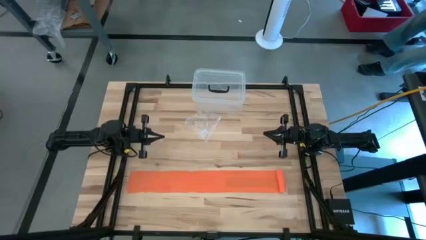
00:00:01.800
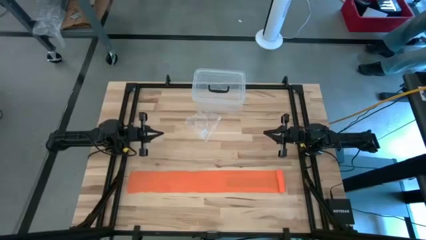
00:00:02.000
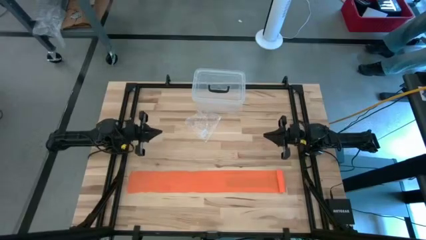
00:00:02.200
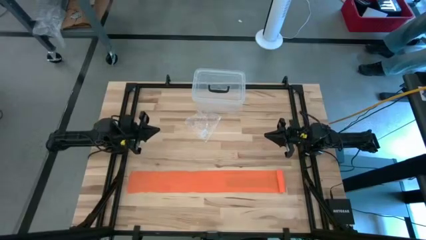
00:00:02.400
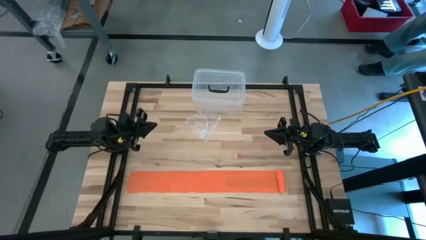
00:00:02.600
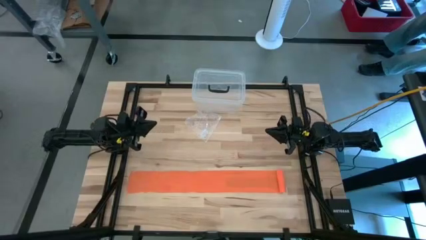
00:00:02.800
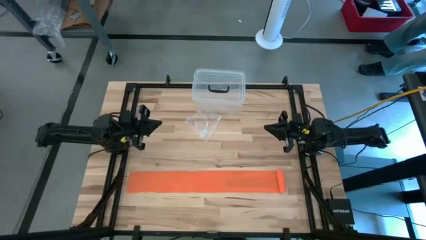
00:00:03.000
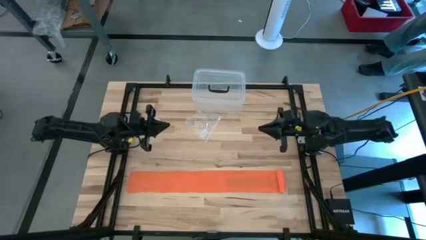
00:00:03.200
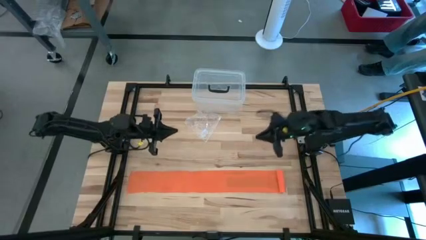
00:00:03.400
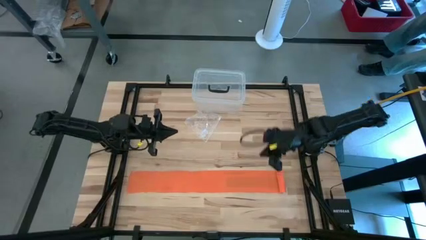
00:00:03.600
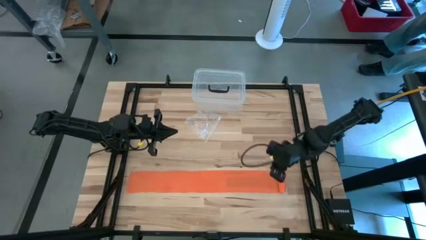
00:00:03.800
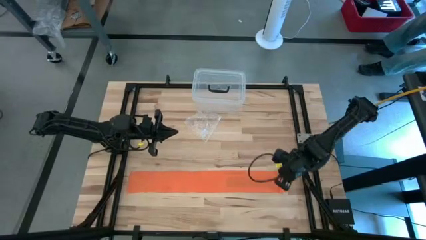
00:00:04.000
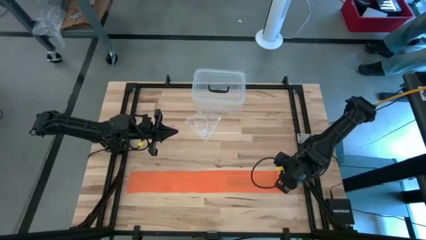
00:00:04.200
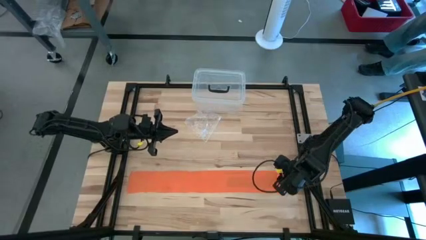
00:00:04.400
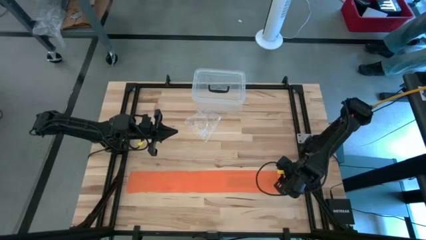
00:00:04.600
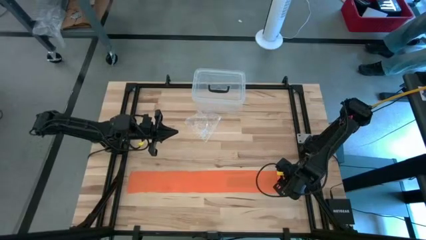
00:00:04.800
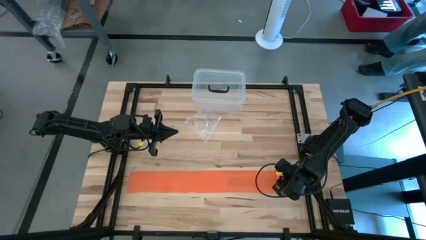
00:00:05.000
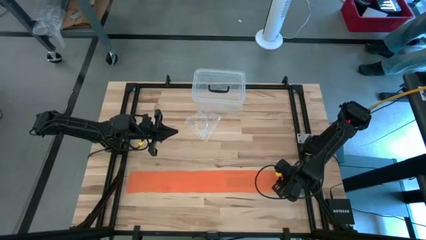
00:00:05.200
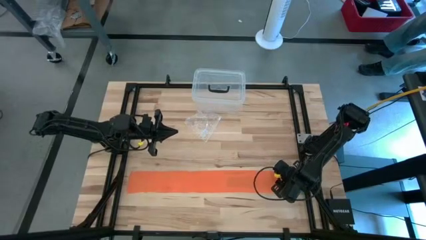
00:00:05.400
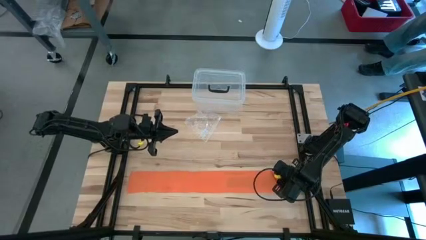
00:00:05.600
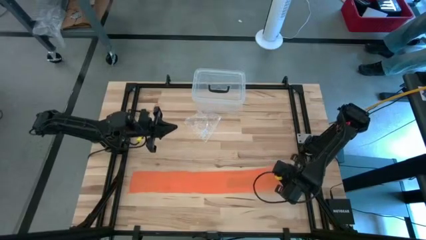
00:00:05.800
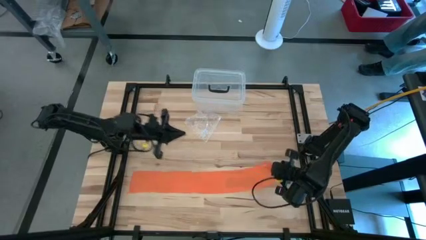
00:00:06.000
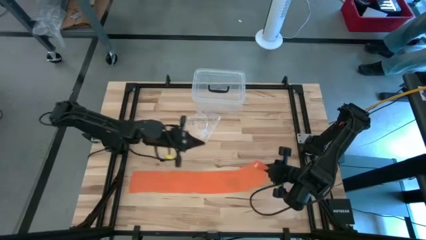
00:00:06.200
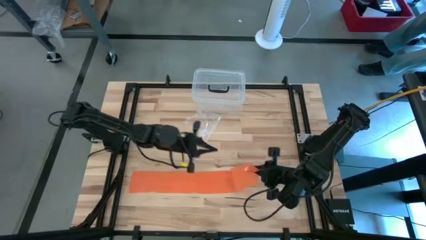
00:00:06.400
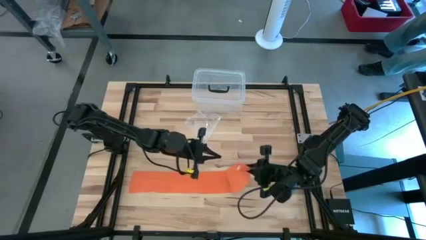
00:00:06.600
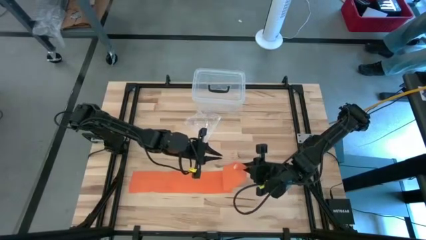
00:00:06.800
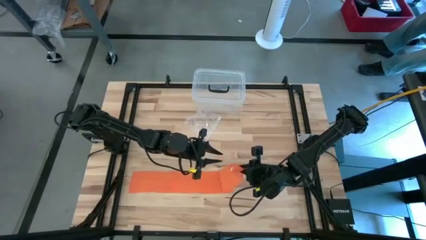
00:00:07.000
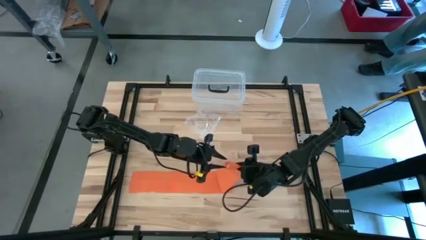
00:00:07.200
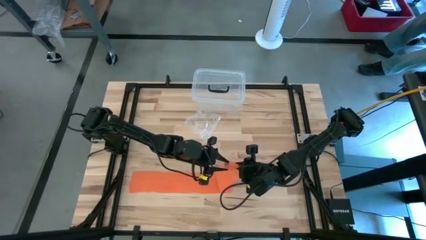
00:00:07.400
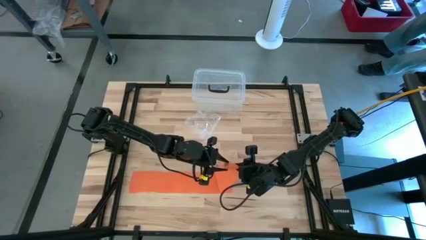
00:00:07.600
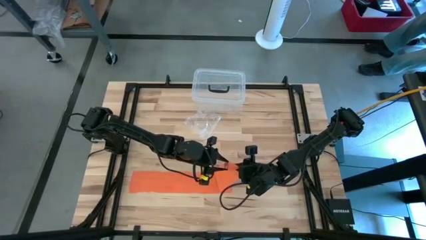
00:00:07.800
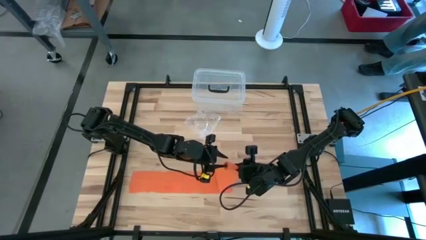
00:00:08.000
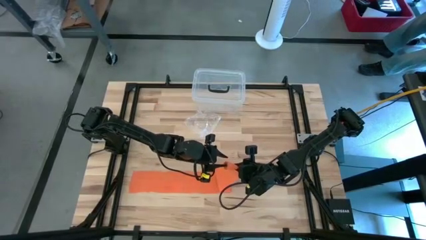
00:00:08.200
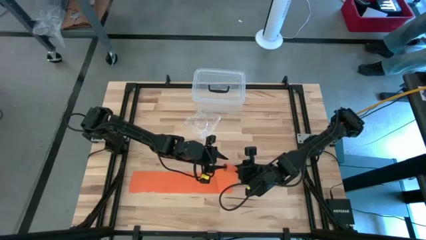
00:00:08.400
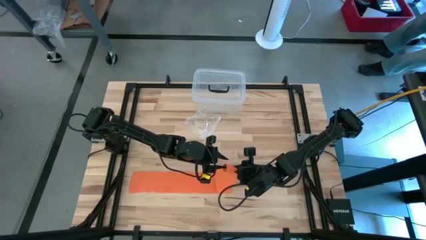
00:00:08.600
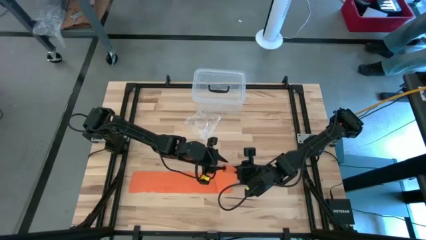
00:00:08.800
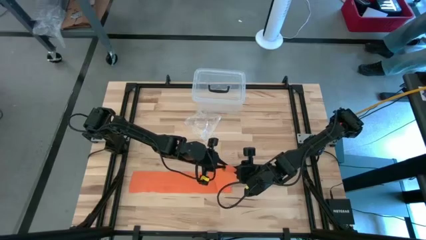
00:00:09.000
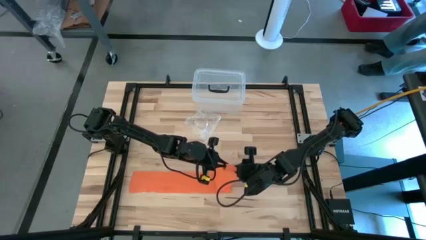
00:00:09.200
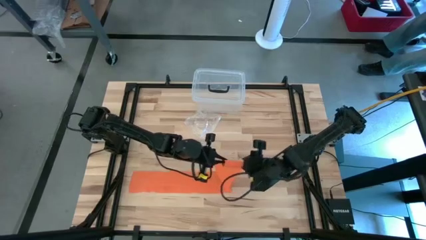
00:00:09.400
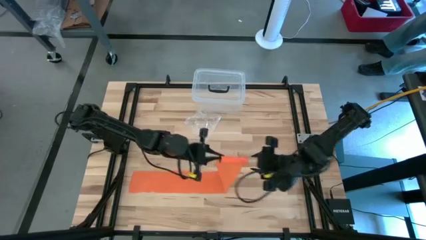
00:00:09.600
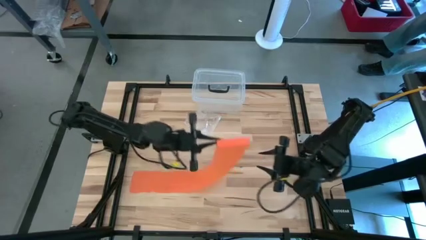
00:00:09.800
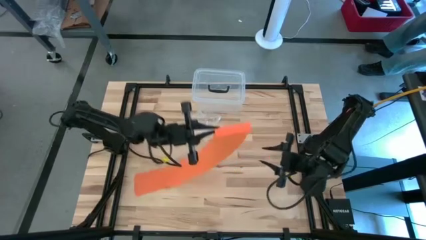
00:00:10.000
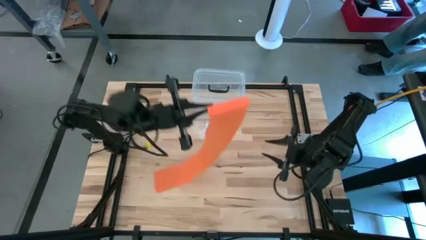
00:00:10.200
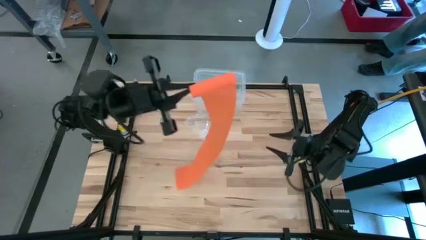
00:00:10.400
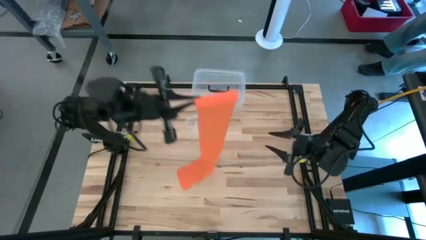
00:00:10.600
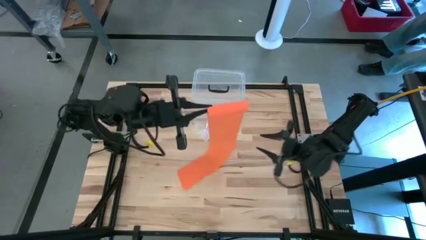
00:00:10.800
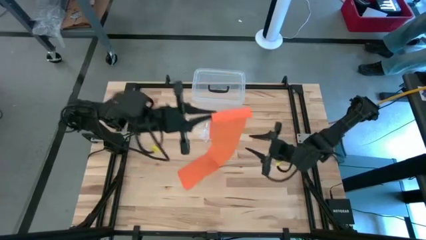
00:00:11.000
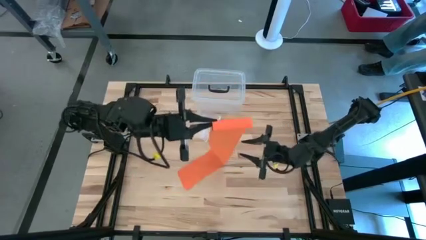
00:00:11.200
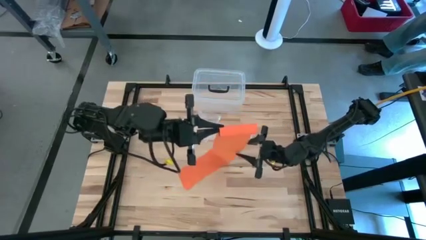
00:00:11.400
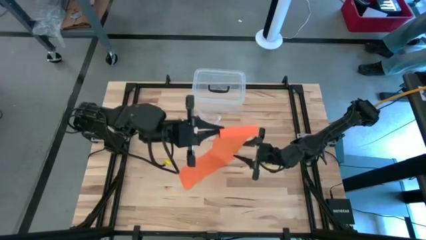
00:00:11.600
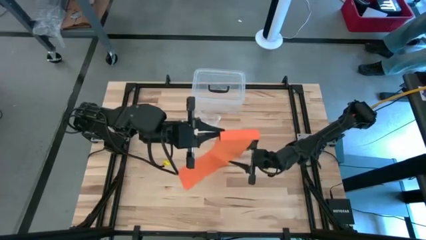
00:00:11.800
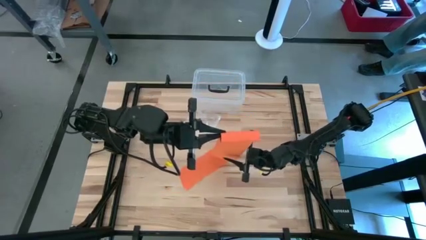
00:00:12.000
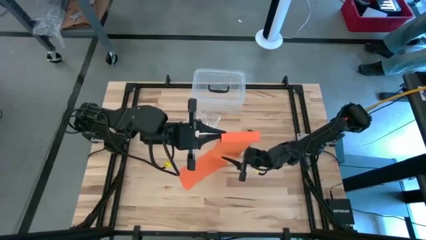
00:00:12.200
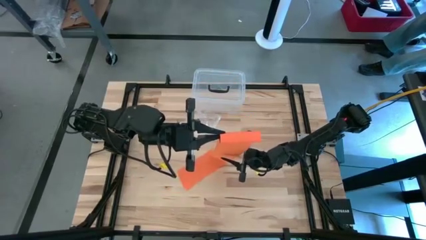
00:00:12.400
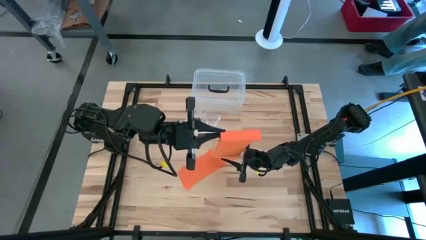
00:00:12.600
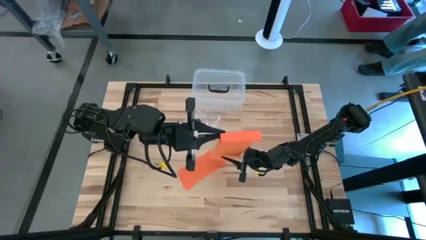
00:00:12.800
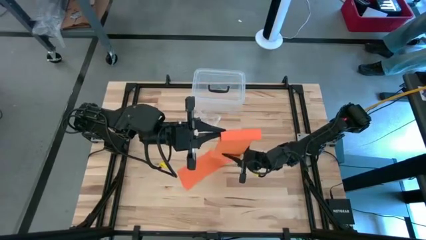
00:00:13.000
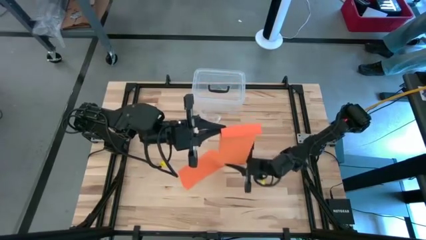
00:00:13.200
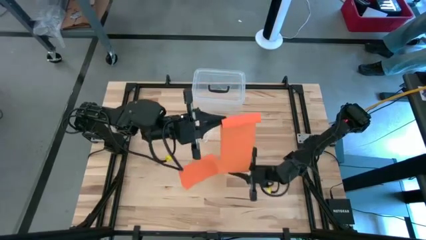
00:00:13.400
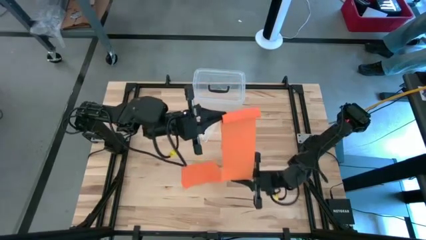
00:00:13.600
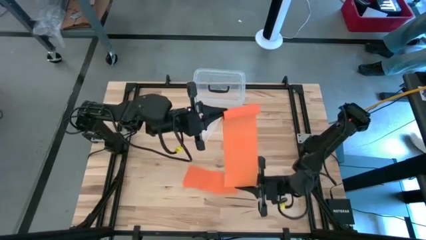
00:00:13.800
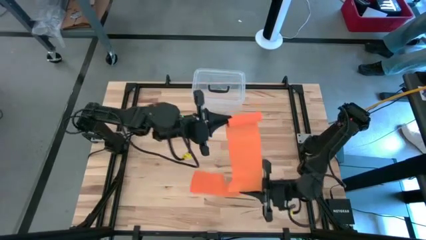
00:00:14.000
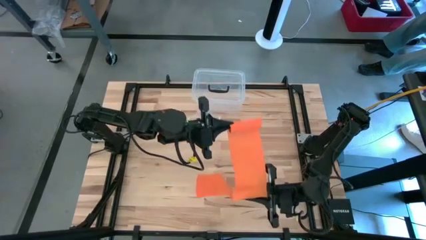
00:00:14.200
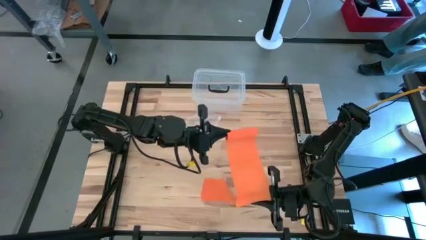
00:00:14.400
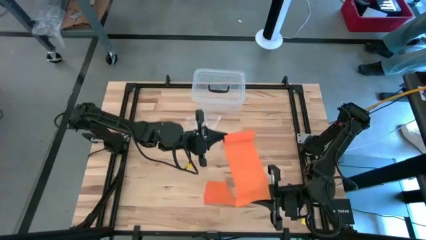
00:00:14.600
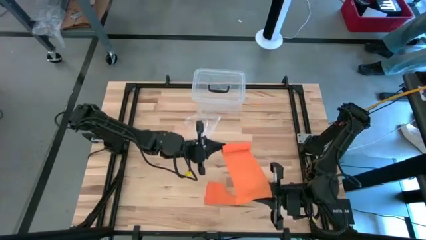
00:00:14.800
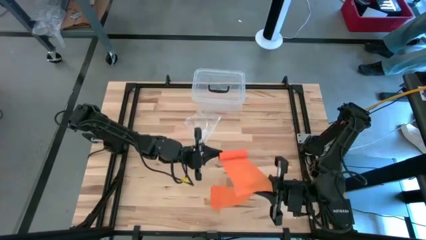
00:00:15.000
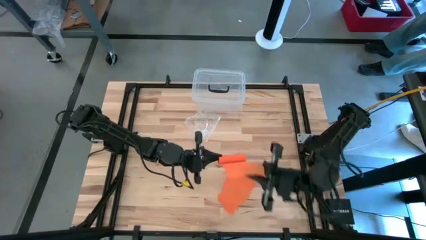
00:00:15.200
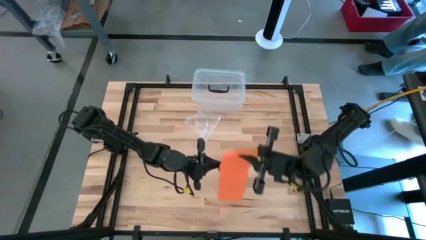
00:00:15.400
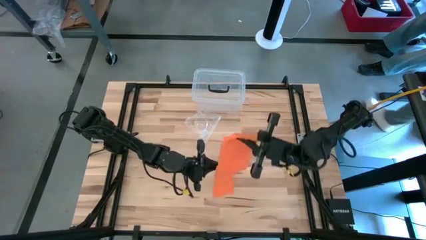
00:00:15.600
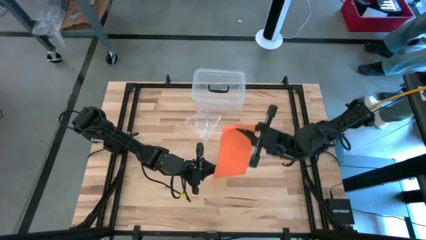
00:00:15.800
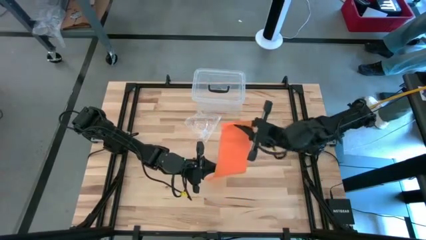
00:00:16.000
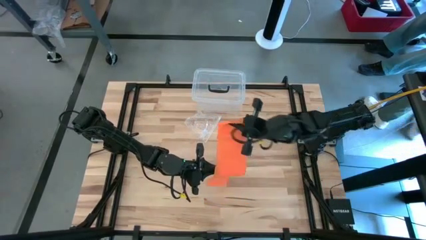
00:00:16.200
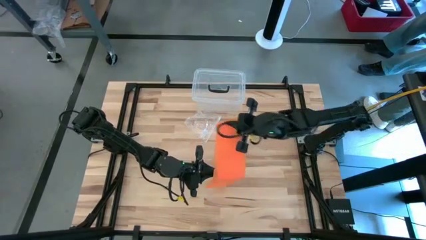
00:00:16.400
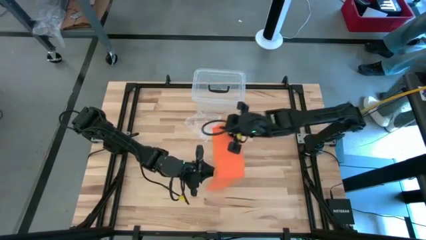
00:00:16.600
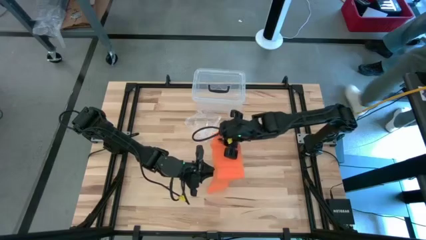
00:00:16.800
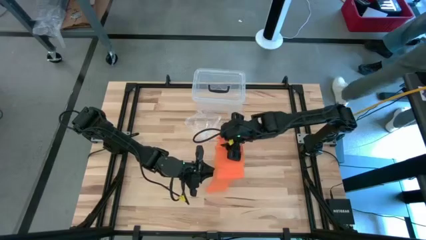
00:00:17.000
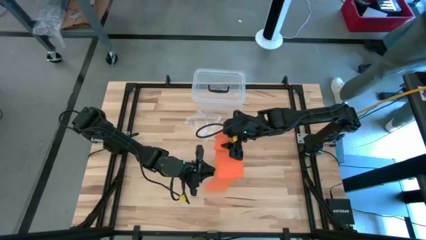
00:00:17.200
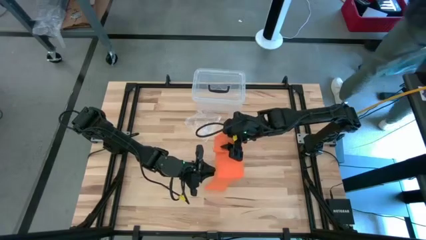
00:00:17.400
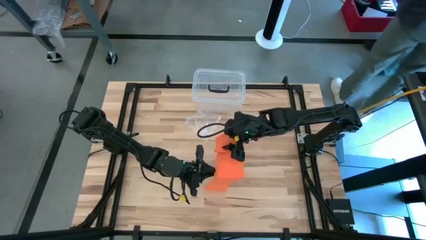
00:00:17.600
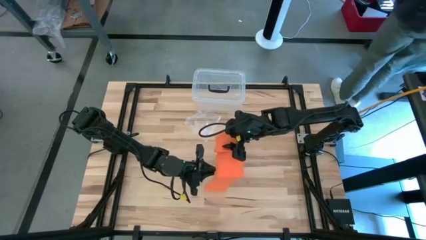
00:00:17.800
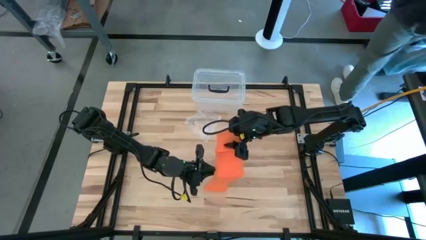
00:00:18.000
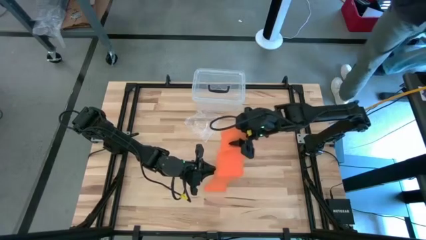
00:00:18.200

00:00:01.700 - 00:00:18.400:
Task: Roll bandage
Roll the orange bandage
